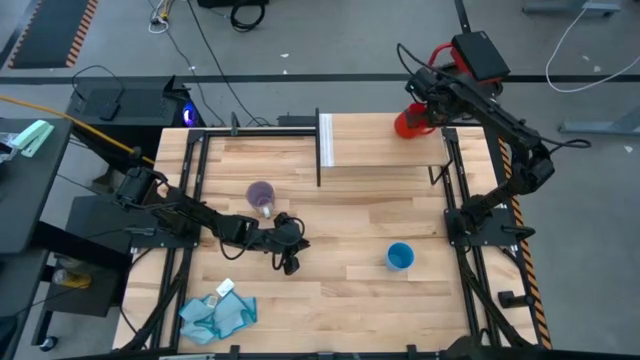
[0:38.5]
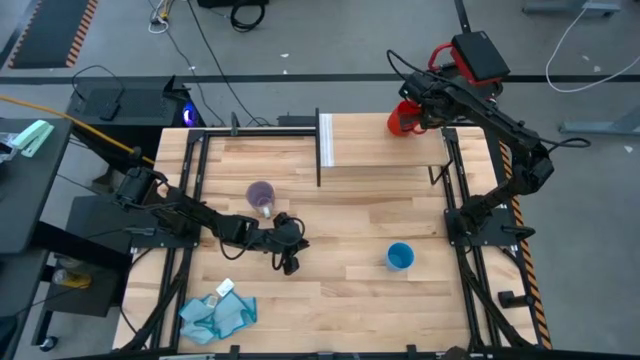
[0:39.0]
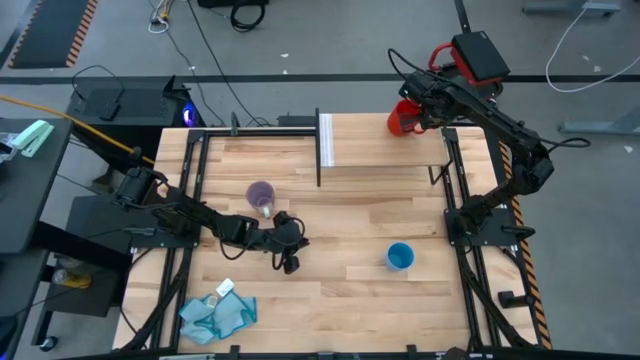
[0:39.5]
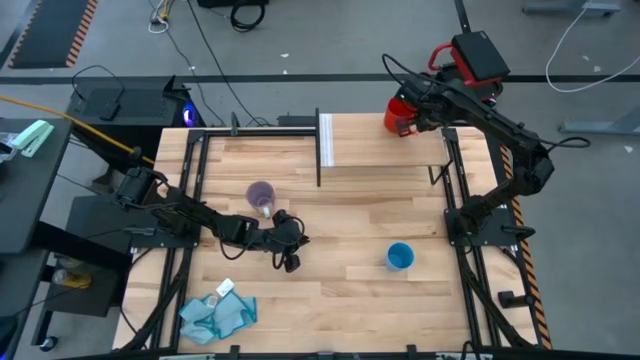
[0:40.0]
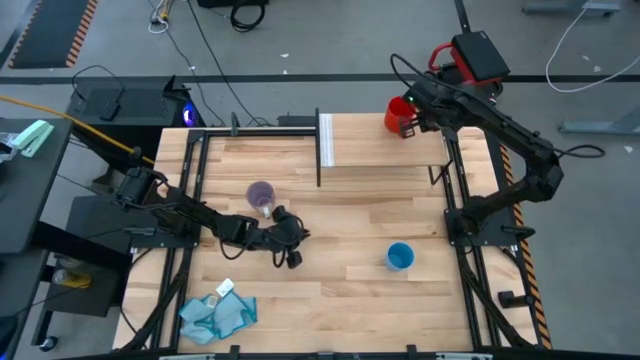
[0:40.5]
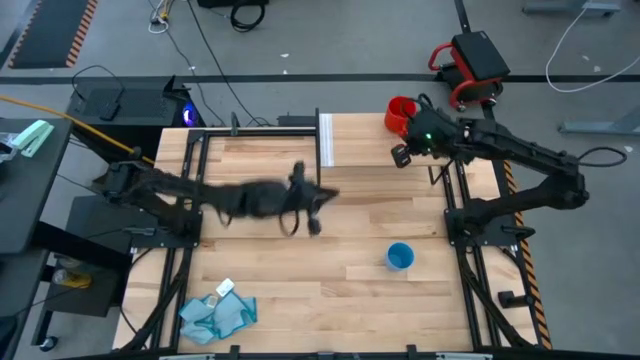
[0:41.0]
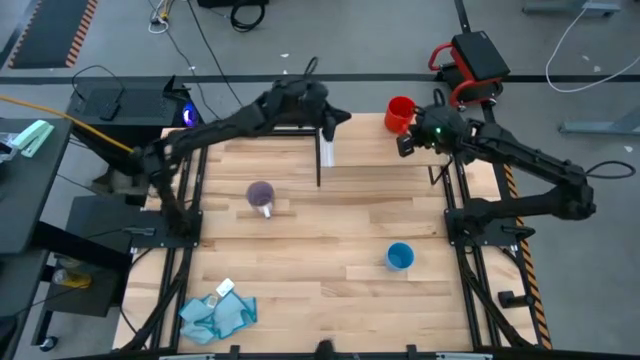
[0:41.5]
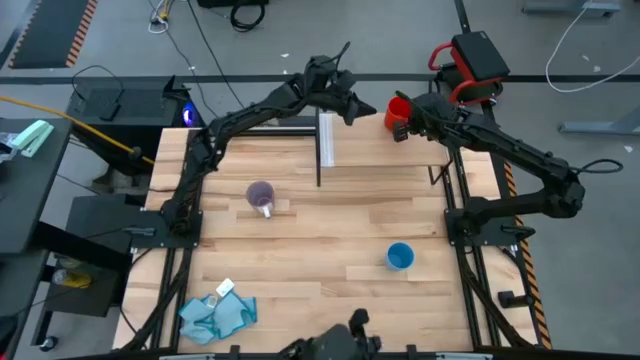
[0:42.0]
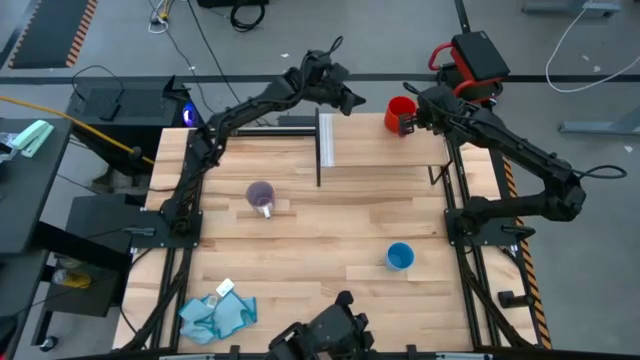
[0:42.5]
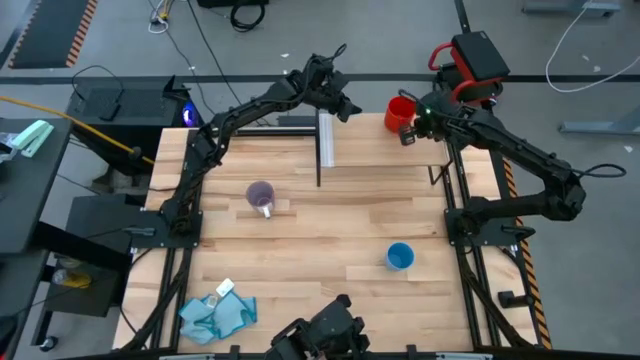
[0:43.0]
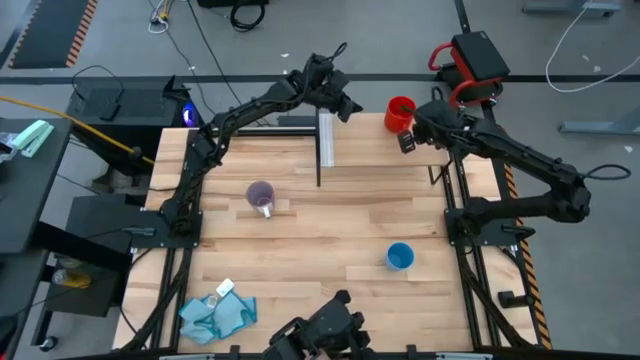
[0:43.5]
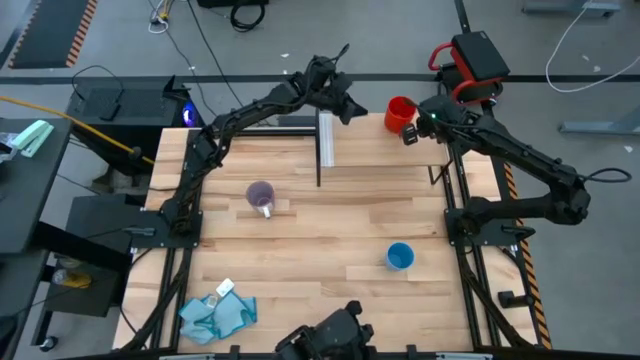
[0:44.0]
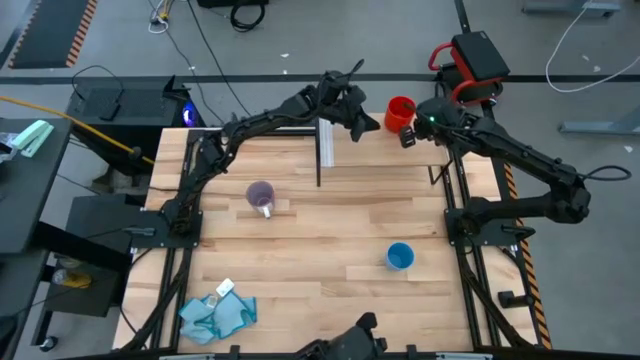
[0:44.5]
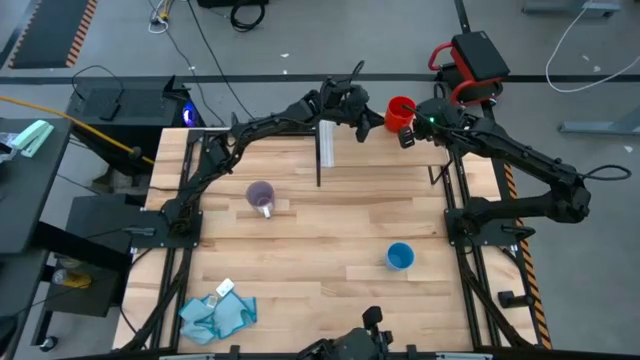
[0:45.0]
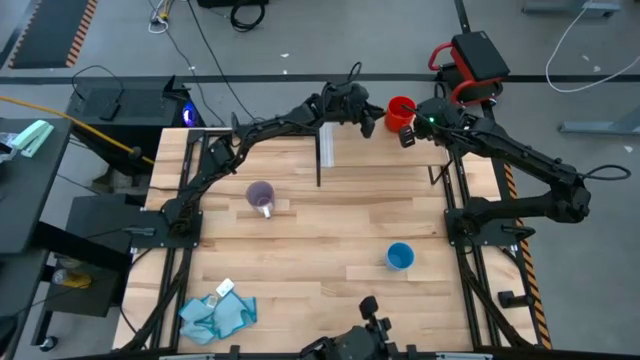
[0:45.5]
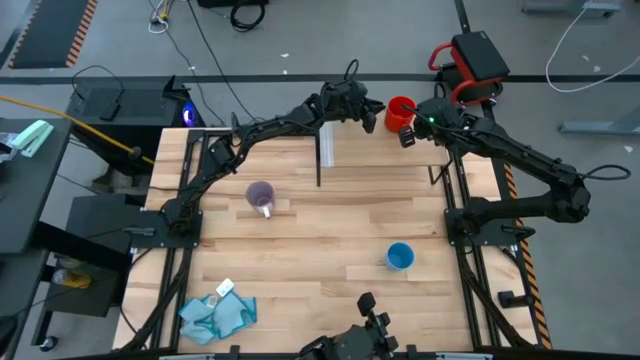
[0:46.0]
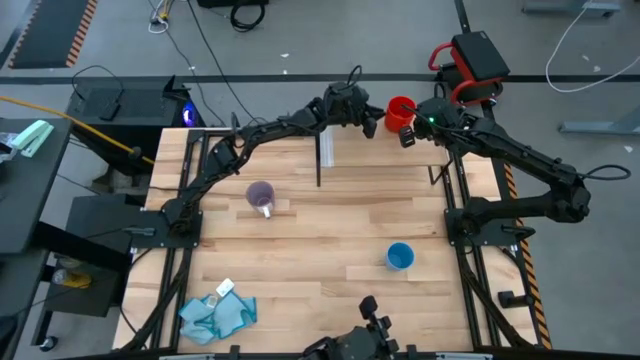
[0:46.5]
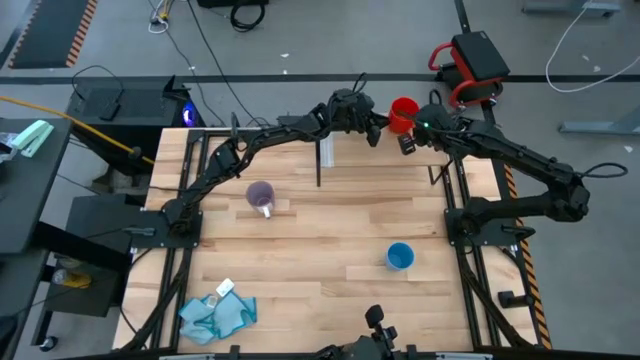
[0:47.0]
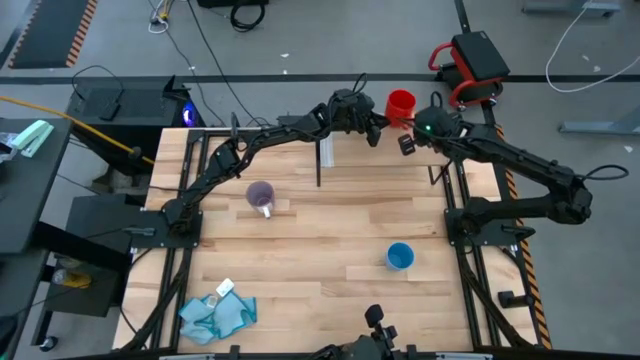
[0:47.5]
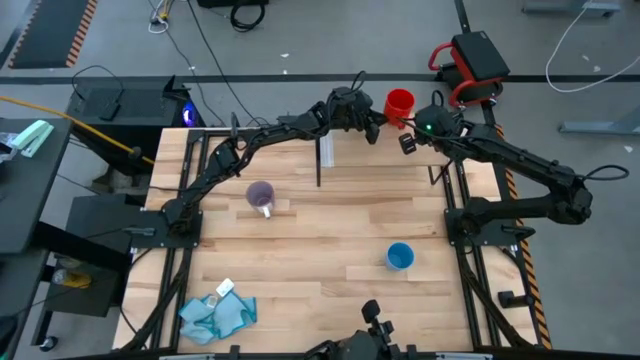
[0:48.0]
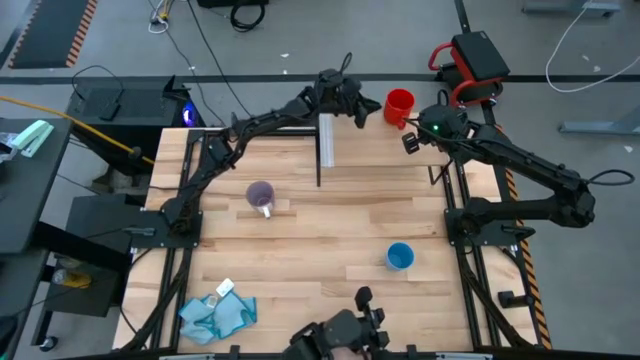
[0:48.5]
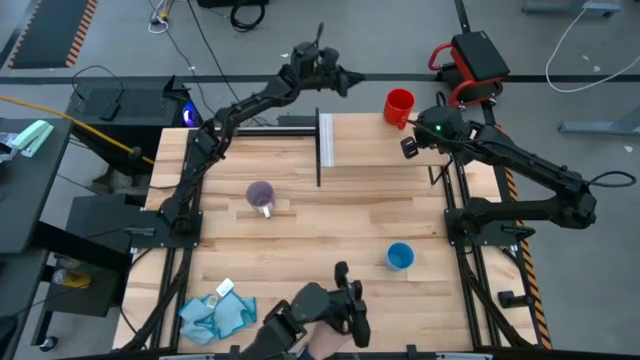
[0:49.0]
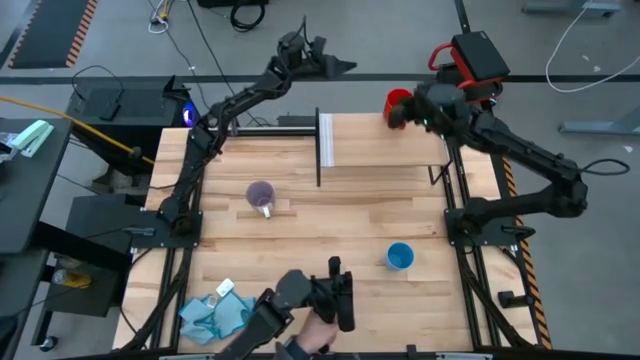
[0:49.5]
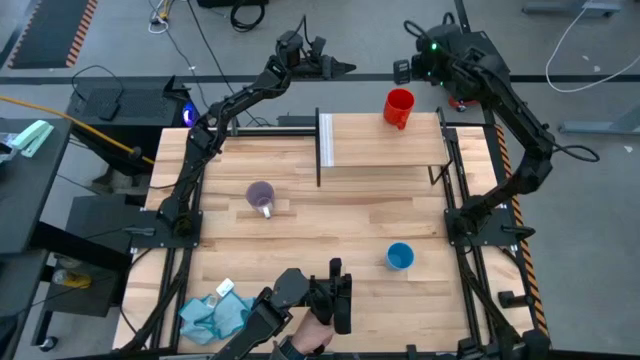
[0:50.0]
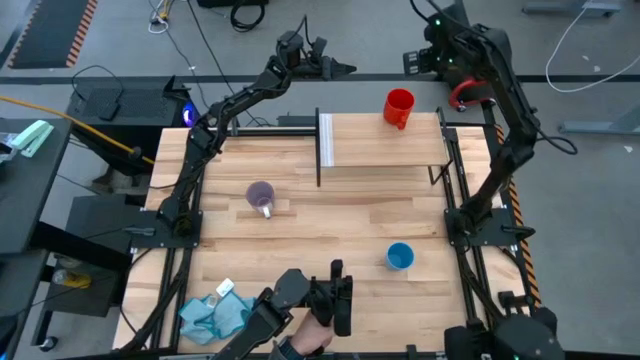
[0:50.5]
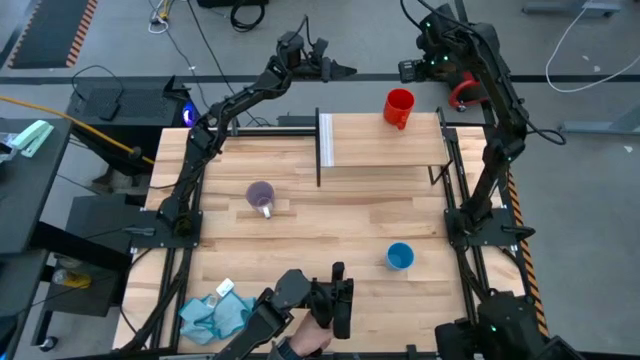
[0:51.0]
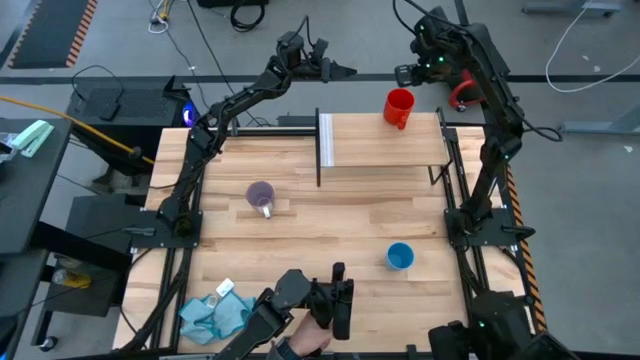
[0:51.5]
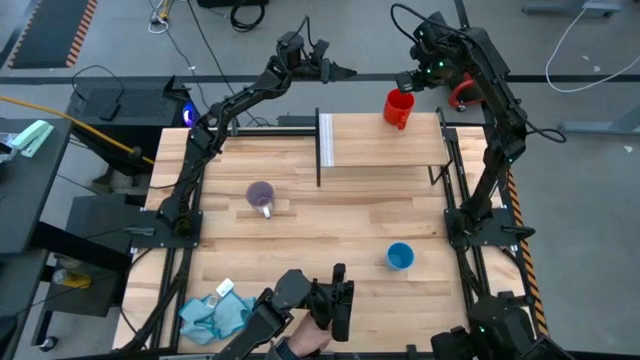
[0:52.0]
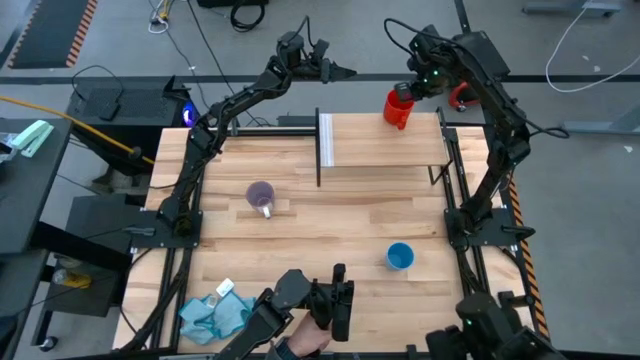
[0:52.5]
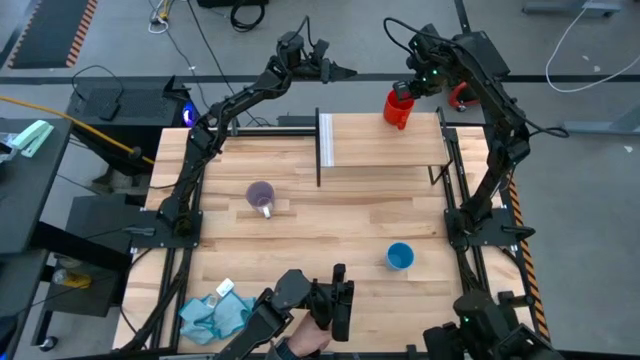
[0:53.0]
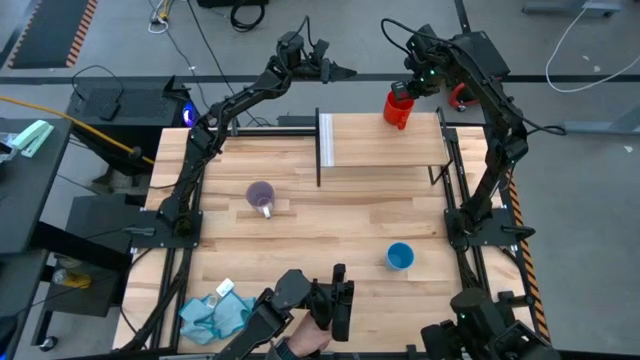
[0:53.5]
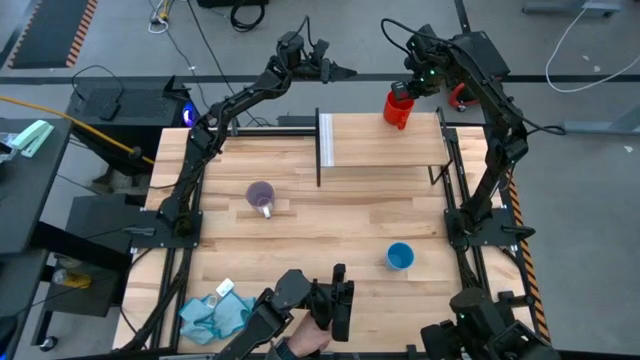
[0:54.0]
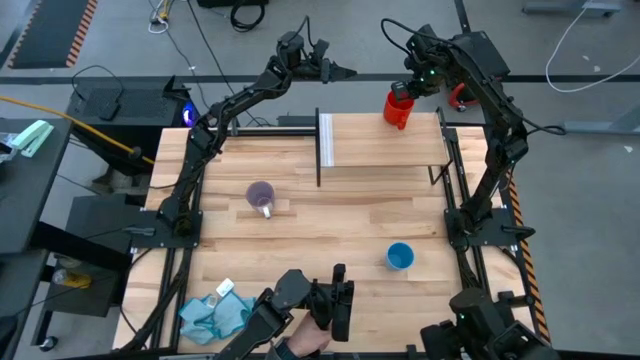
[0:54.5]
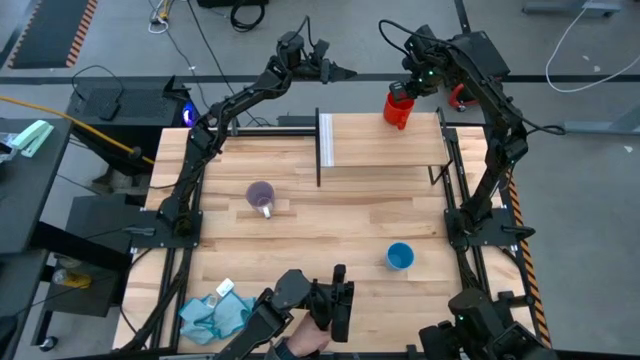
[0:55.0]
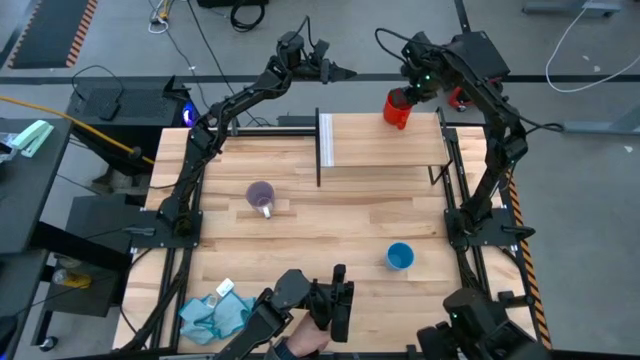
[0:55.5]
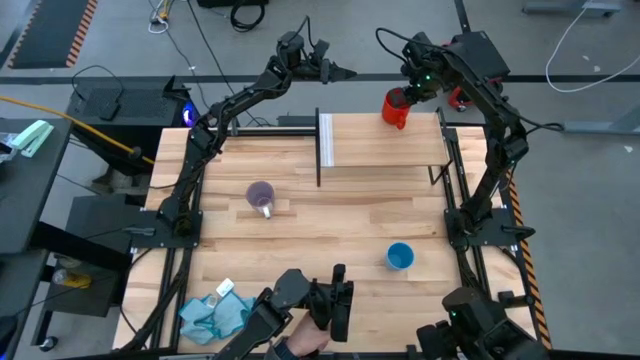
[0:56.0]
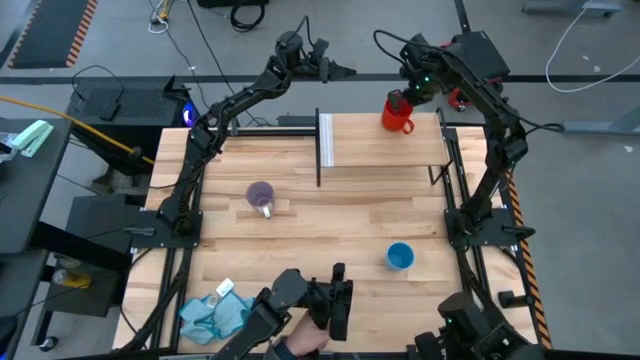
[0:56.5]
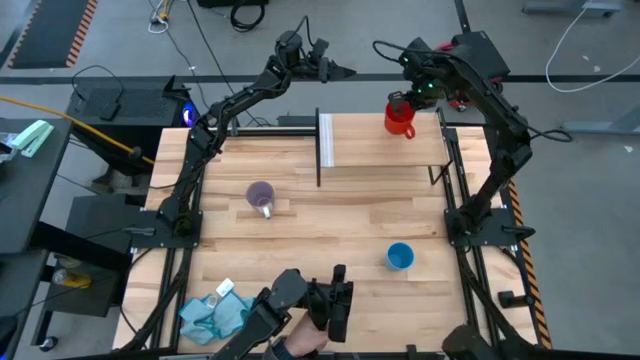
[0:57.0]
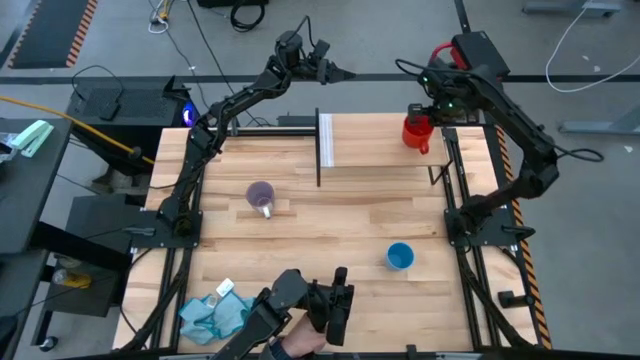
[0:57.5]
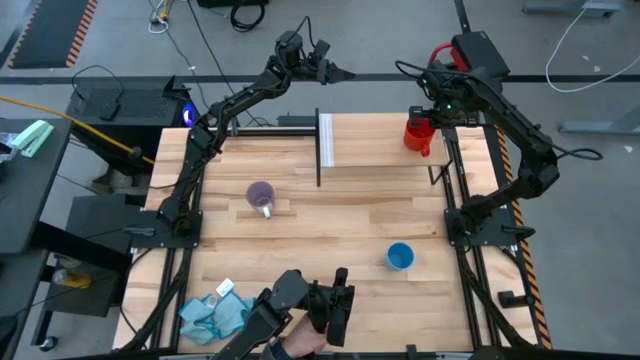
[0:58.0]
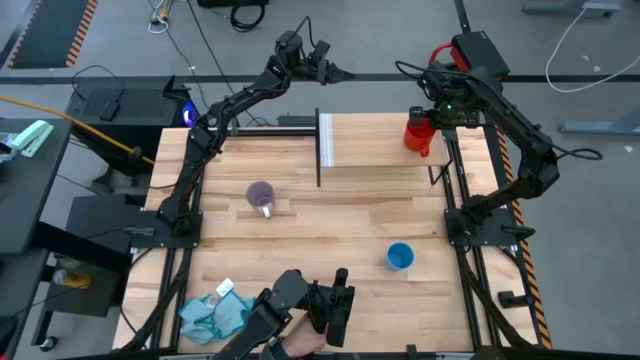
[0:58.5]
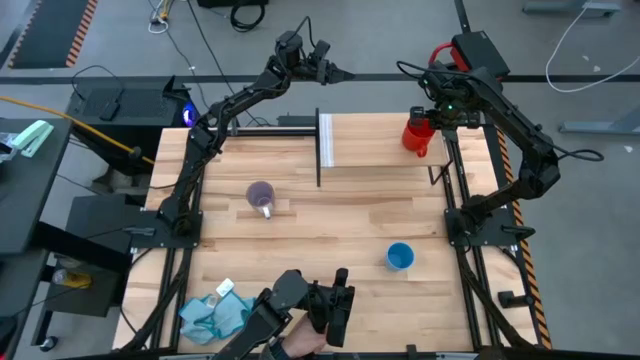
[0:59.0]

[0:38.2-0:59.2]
Task: Stack small to large cups/mugs on shelf
Put the red mug on the shelf
